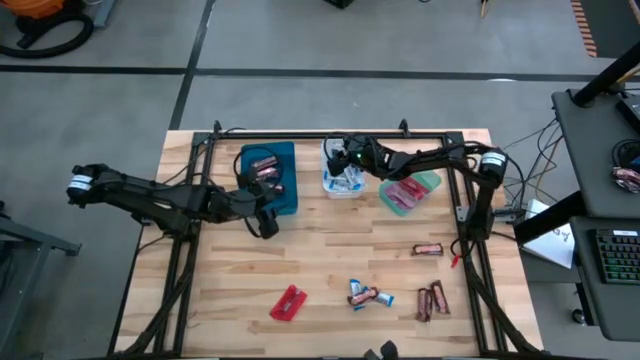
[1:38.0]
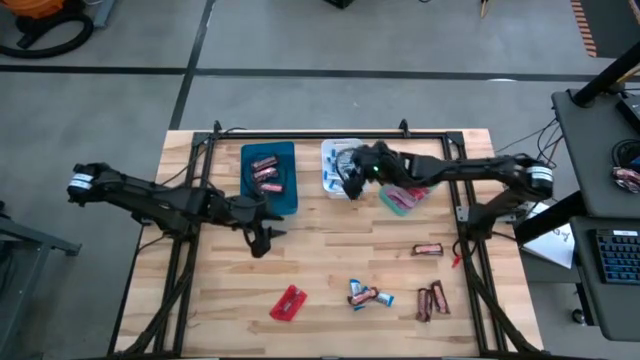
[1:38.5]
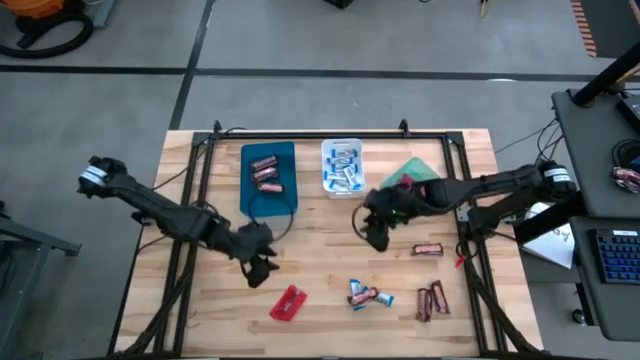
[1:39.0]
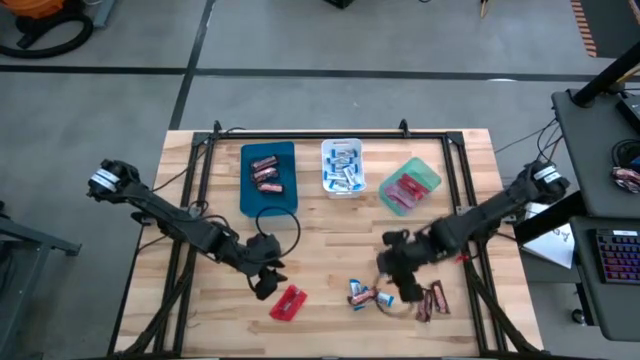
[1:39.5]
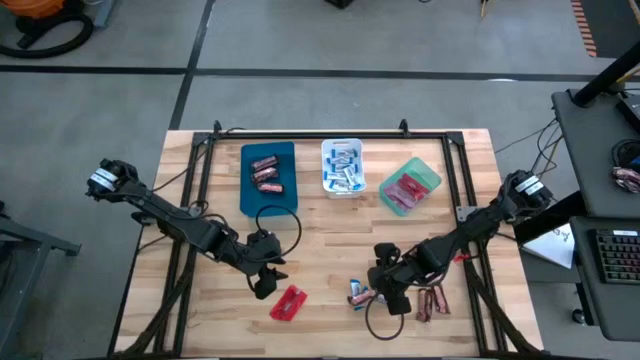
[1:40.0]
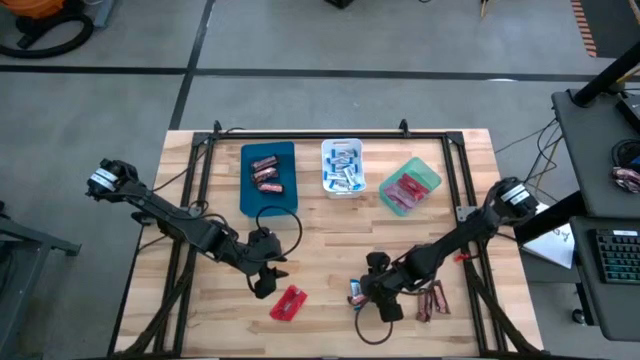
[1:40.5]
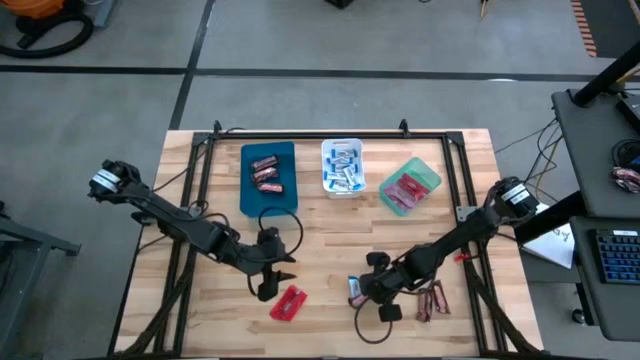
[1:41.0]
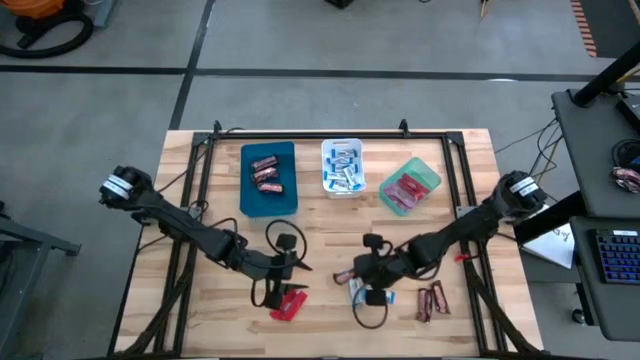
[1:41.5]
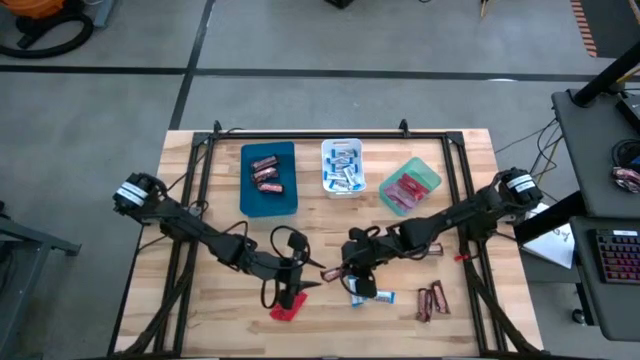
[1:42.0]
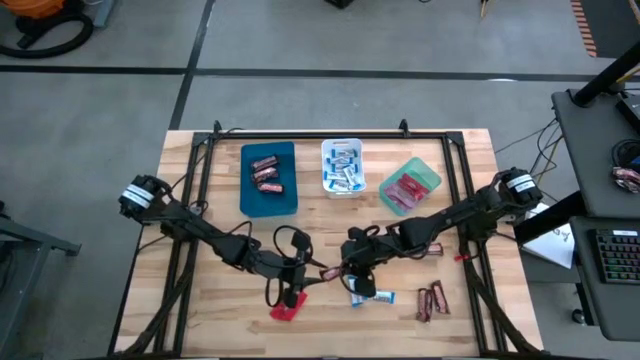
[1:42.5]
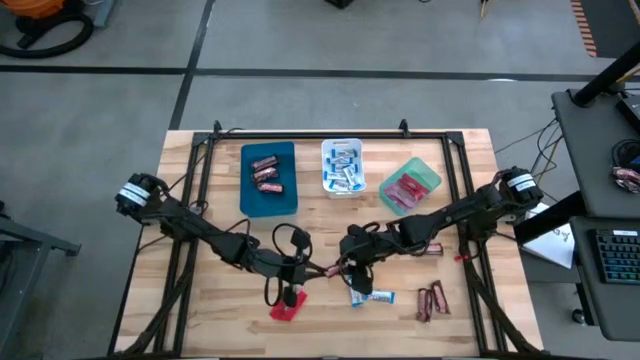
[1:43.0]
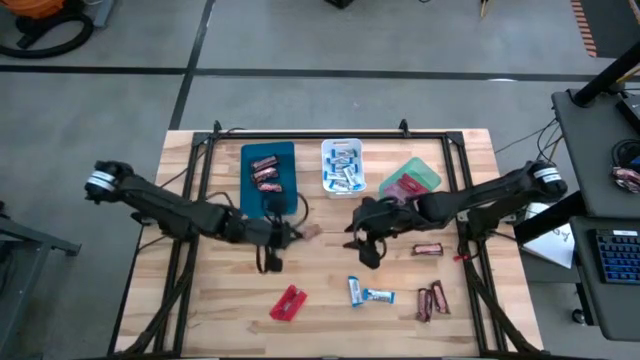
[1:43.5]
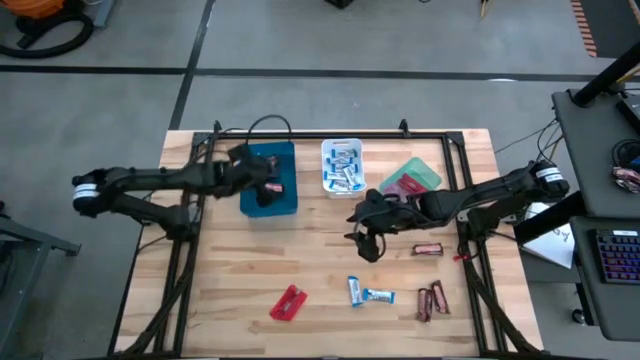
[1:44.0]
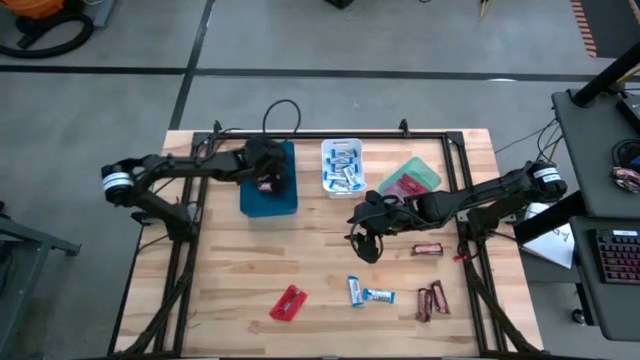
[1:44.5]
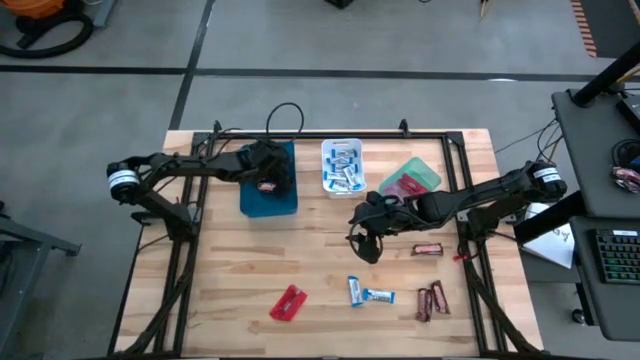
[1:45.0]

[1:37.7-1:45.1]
Task: Sort candy
Put the brown chocolate into the blue bin

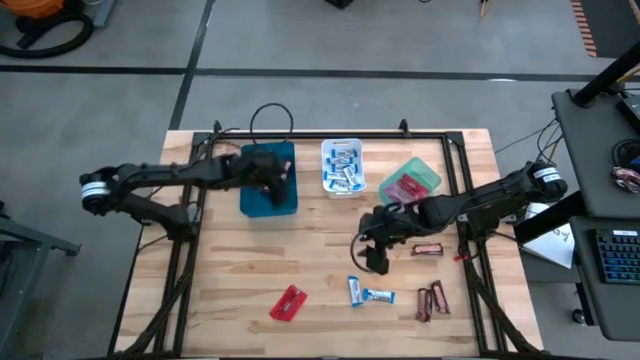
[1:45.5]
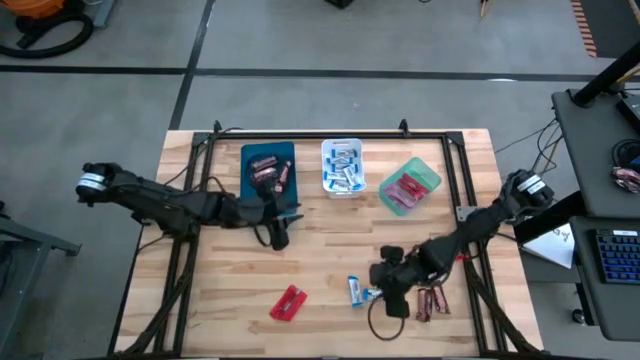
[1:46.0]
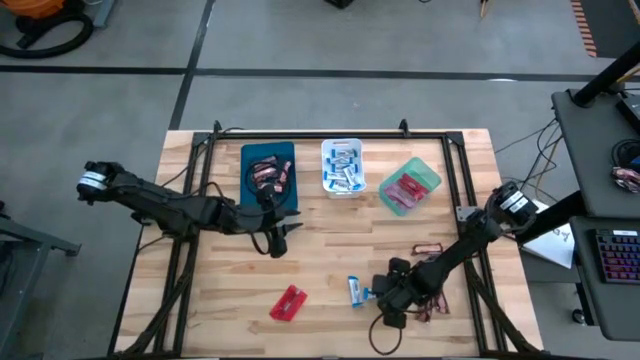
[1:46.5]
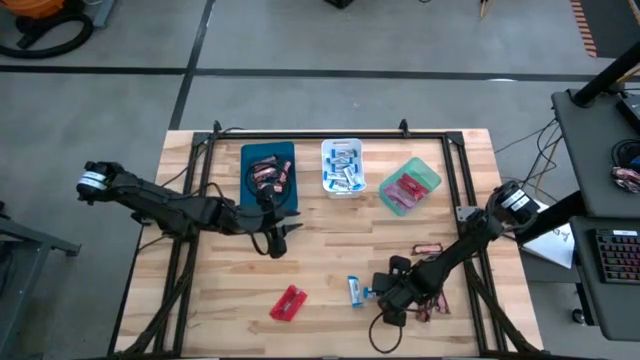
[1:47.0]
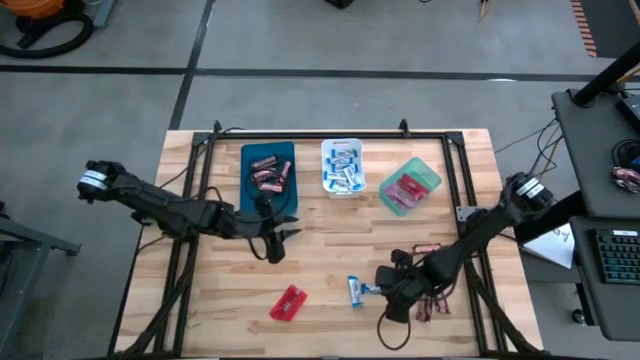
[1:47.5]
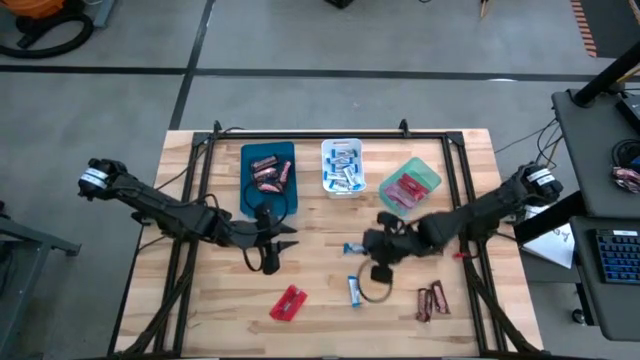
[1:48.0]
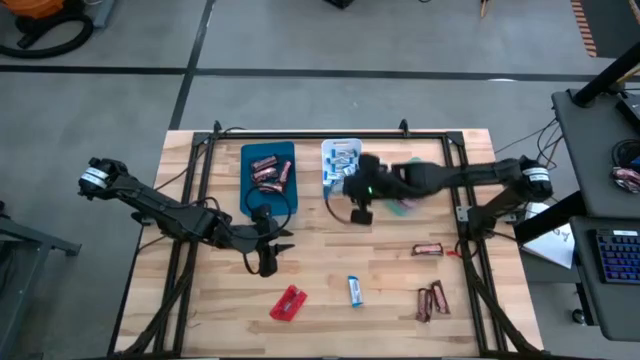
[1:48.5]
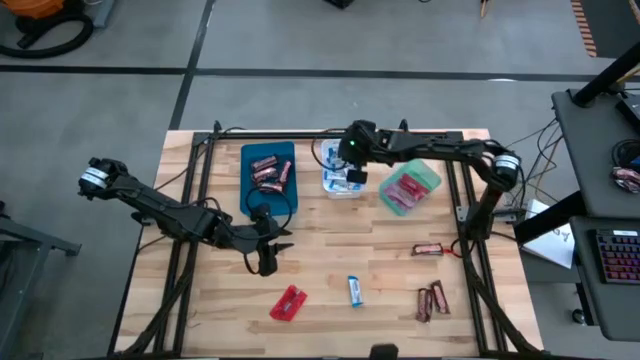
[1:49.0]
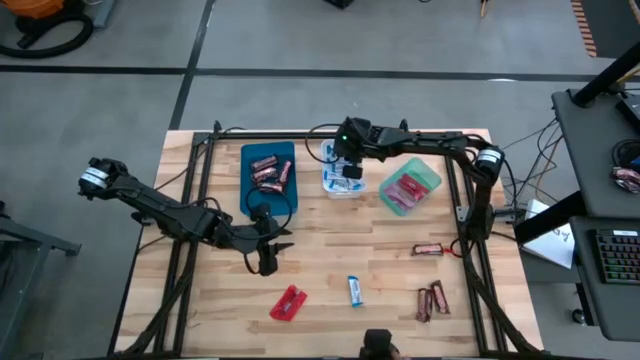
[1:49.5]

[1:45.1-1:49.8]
Put the white chocolate into the white bin

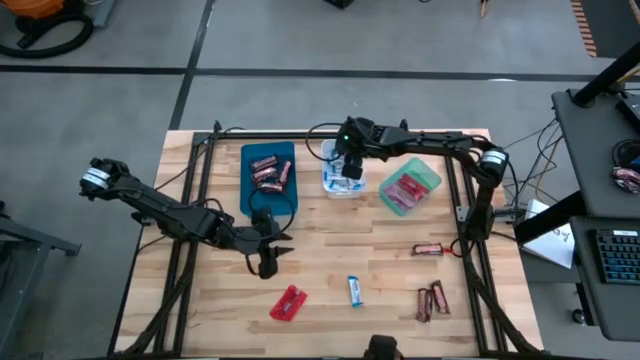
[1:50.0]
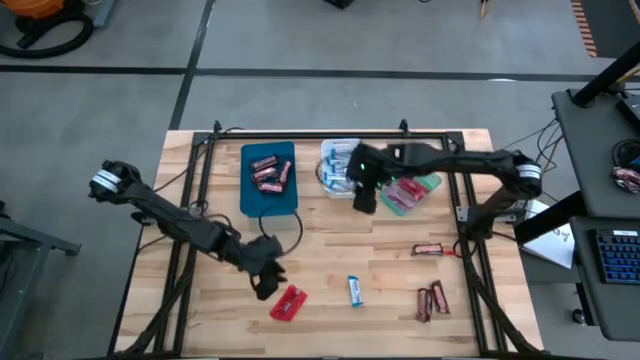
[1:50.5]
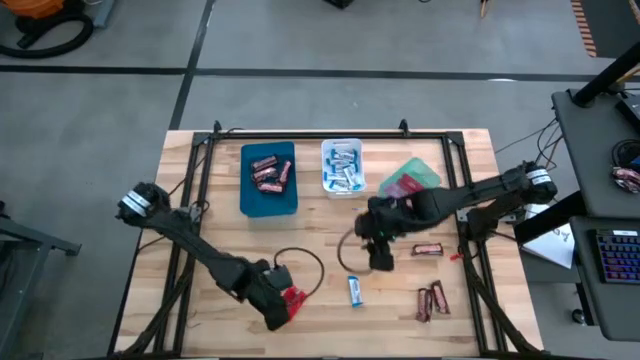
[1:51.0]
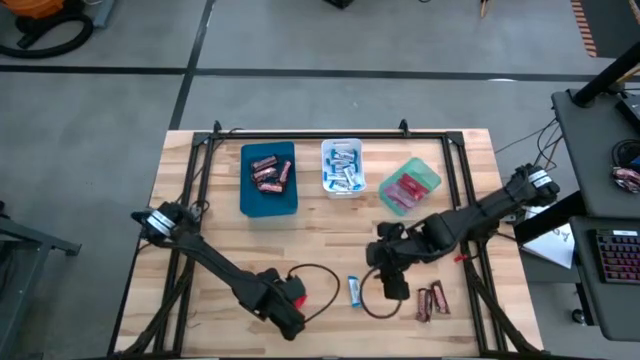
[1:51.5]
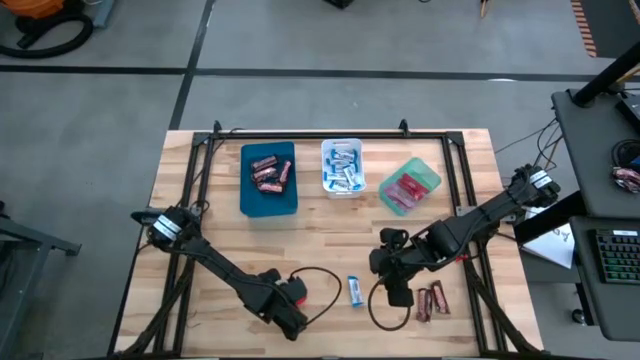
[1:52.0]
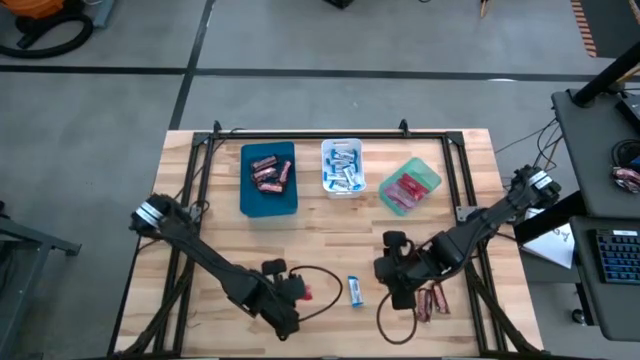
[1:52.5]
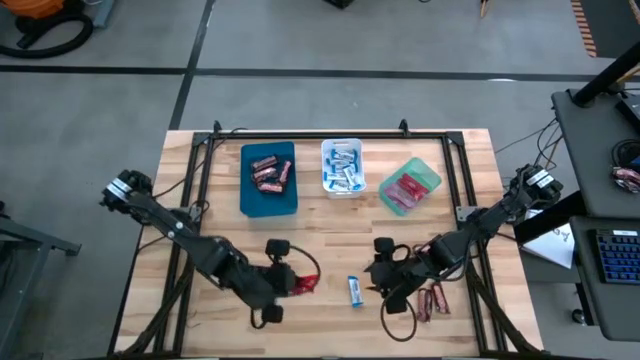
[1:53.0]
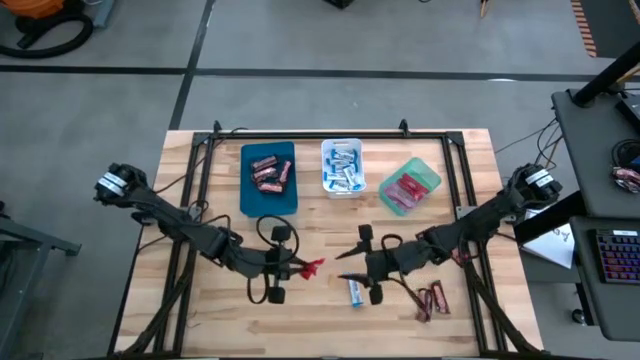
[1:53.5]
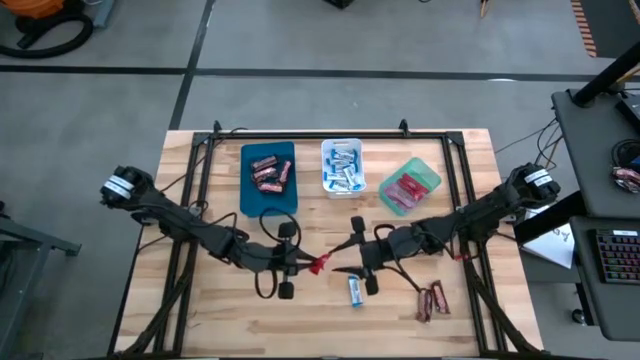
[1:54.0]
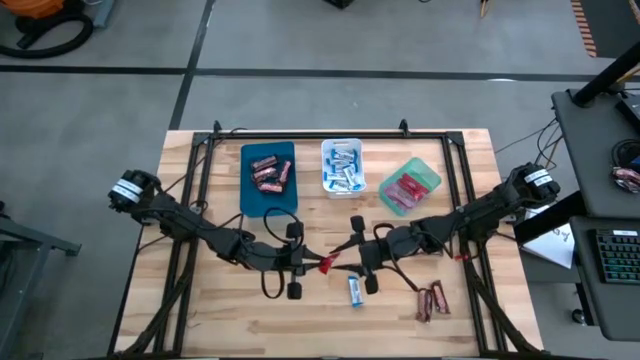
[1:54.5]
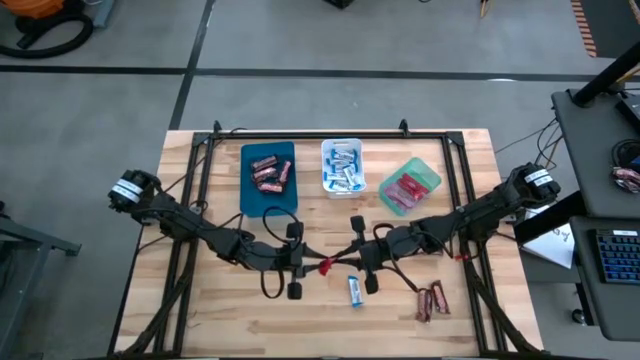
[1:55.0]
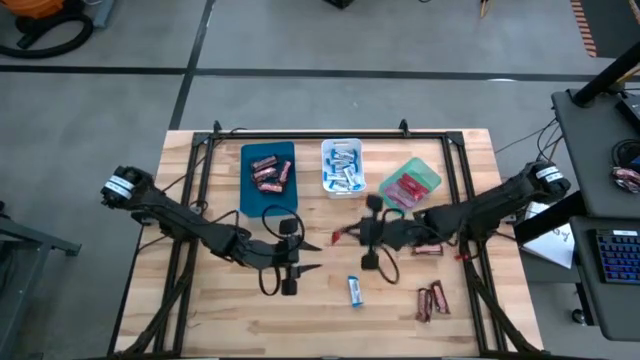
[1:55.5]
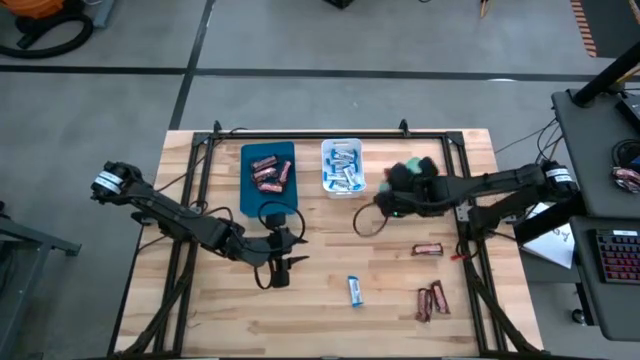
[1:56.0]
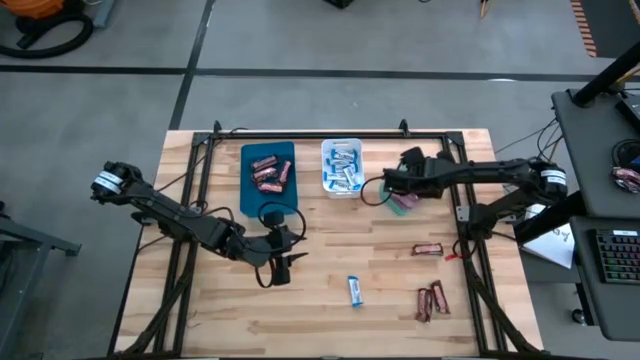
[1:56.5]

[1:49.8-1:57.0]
Put the red candy into the green bin

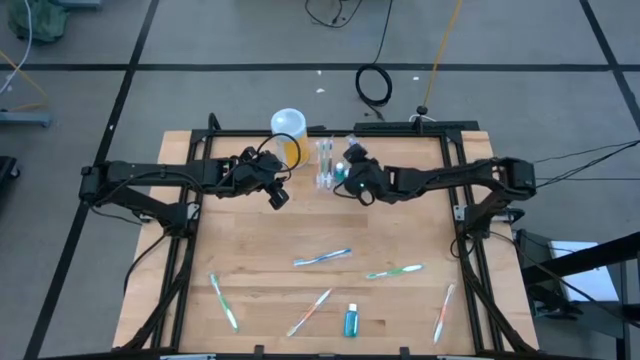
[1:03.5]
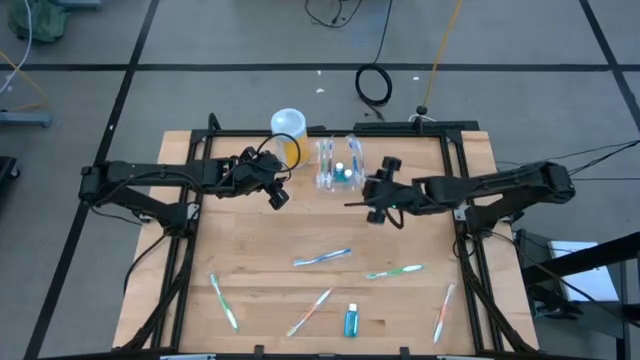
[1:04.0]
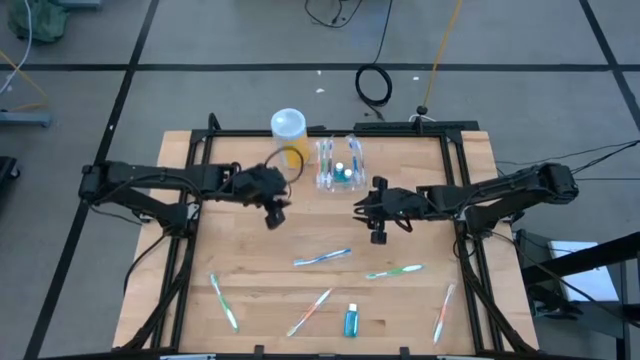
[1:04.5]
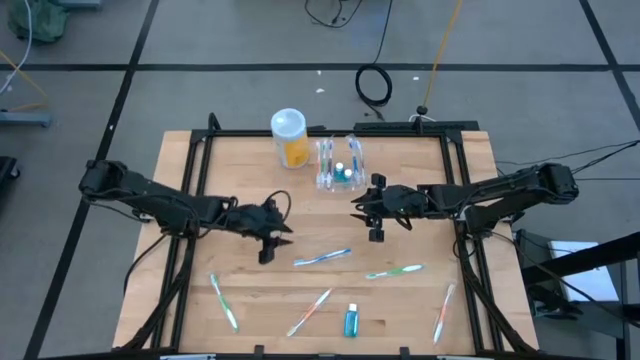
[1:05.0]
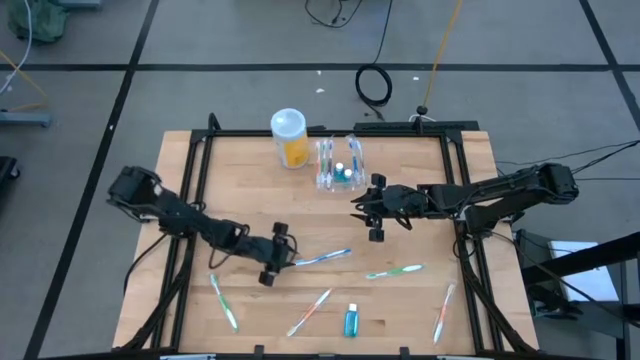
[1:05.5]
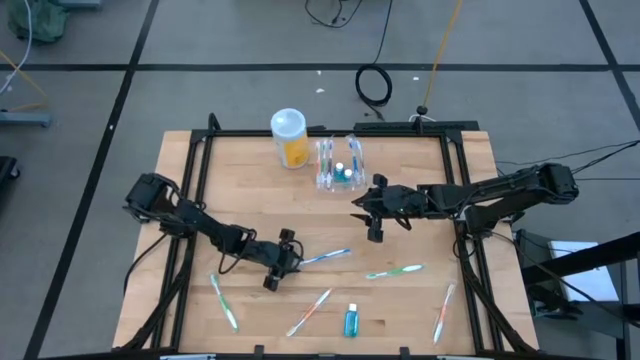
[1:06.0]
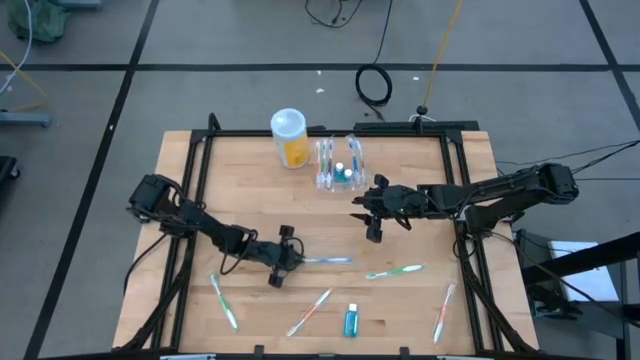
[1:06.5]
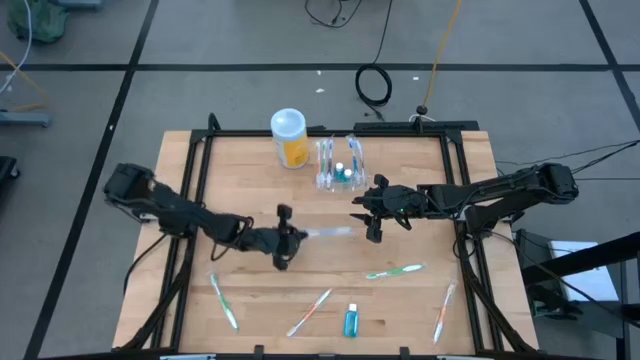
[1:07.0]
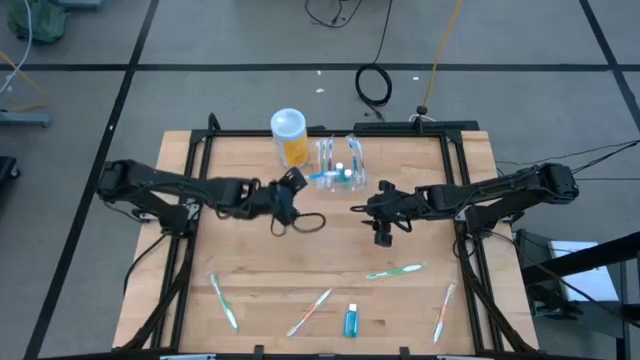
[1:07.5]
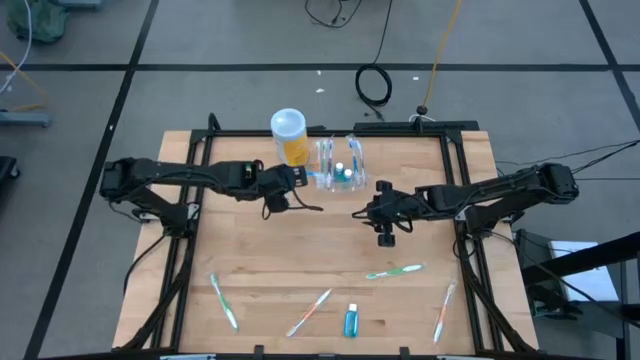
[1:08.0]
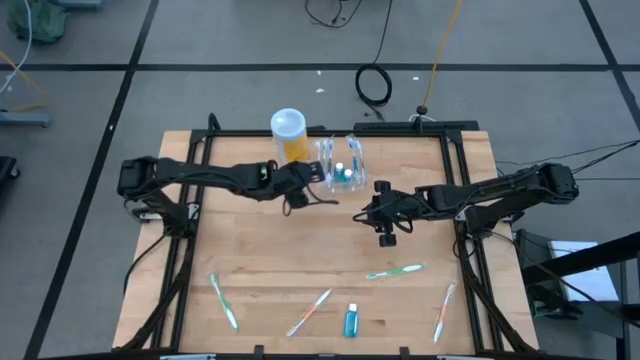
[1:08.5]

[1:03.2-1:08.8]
Task: Pick & Place toothbrushing station
Put the blue toothbrush into the transparent organizer
